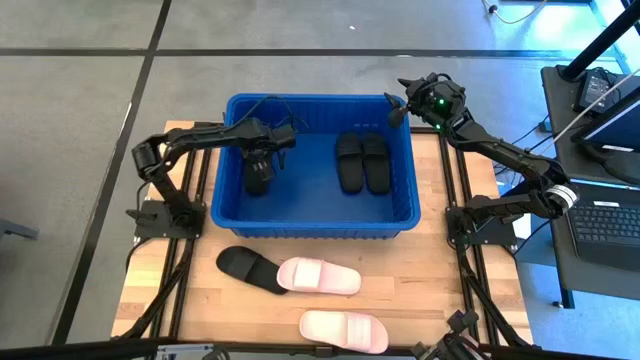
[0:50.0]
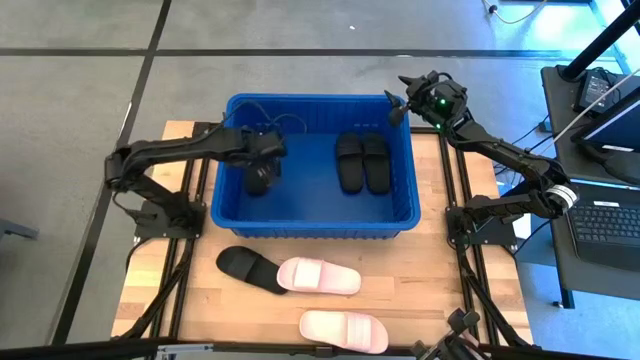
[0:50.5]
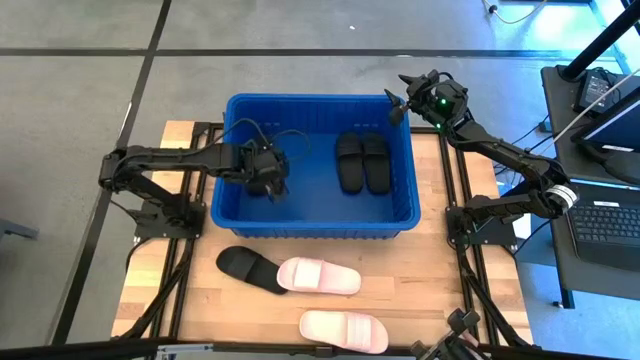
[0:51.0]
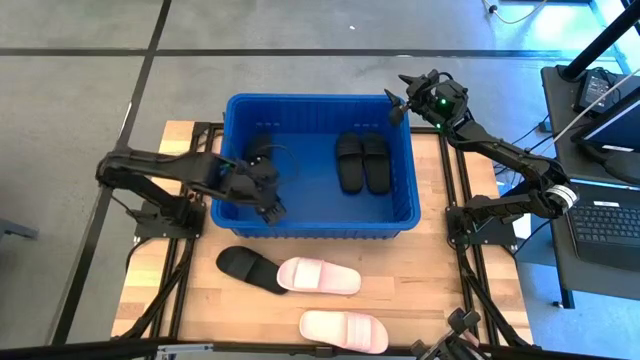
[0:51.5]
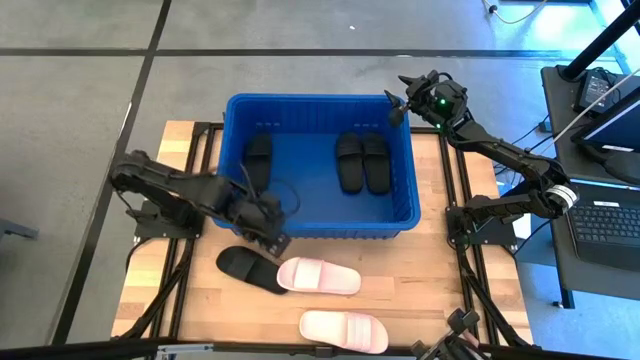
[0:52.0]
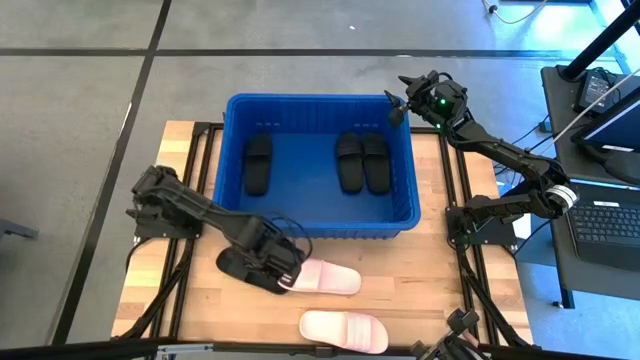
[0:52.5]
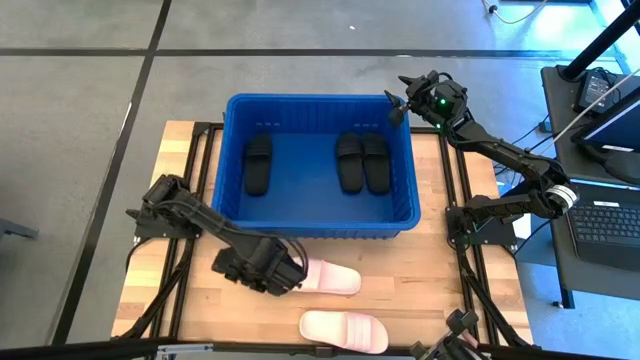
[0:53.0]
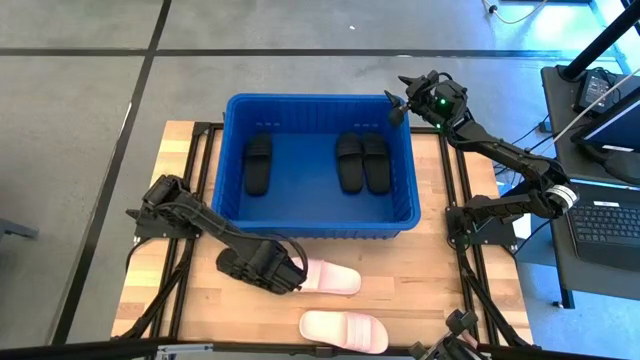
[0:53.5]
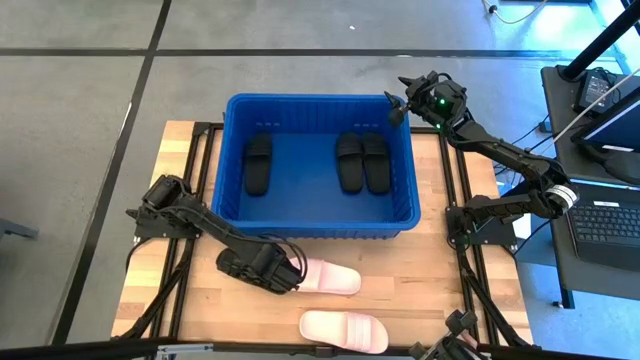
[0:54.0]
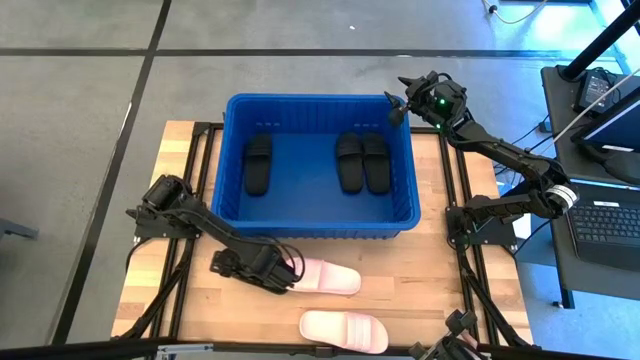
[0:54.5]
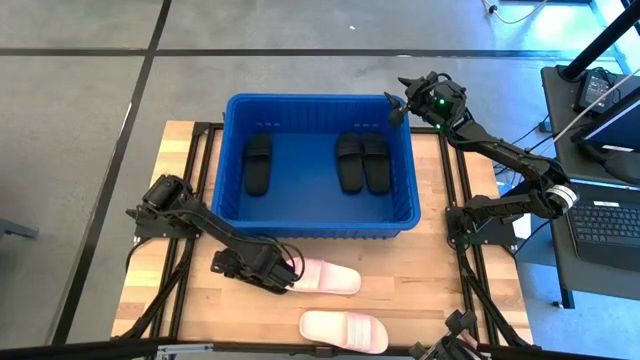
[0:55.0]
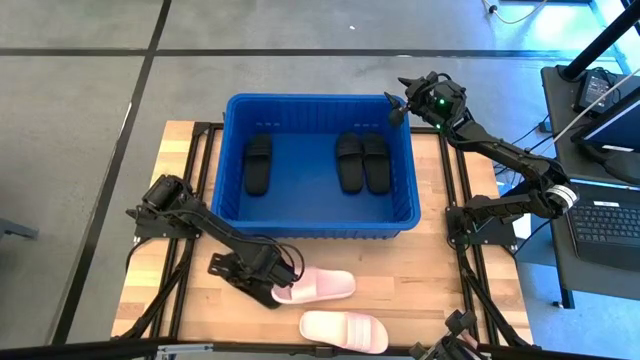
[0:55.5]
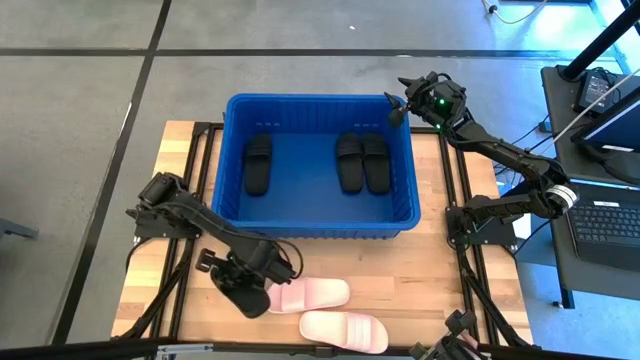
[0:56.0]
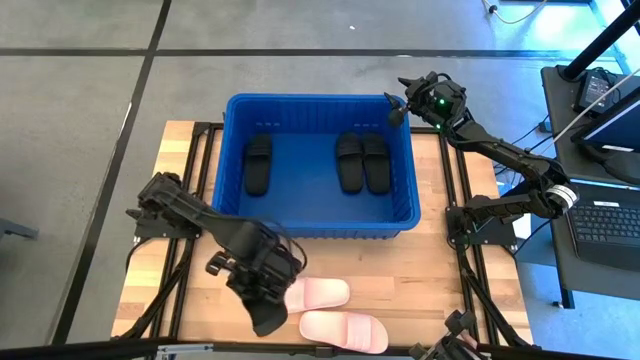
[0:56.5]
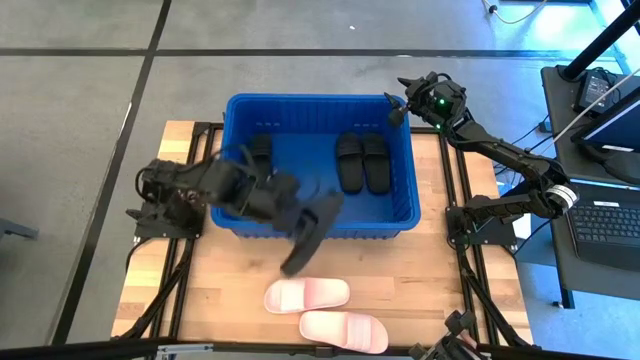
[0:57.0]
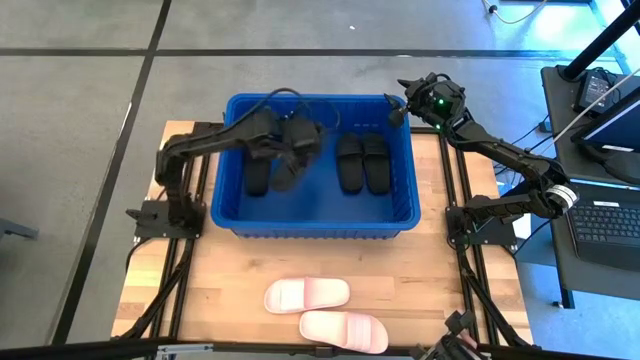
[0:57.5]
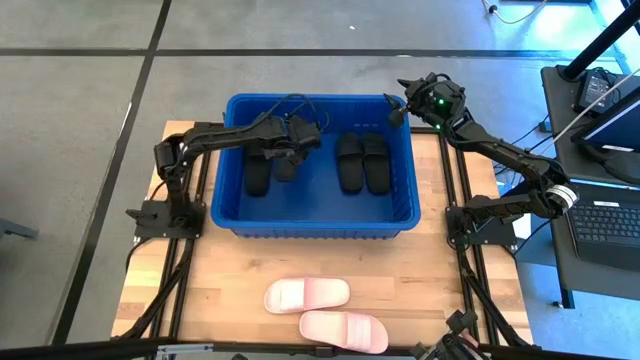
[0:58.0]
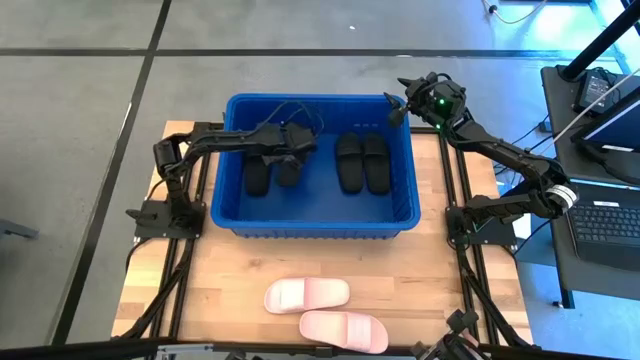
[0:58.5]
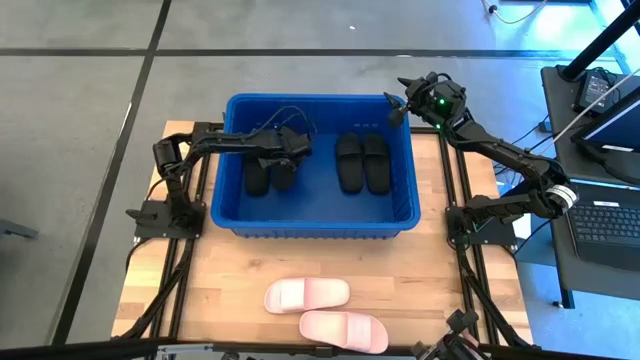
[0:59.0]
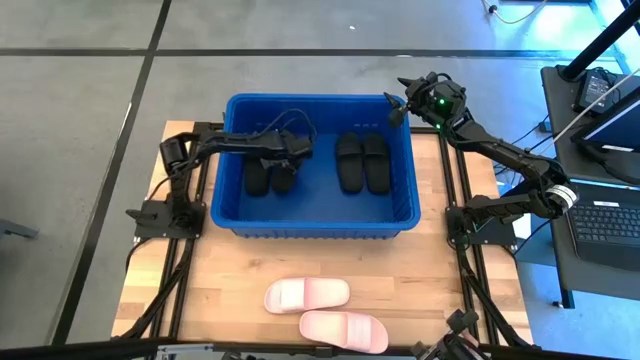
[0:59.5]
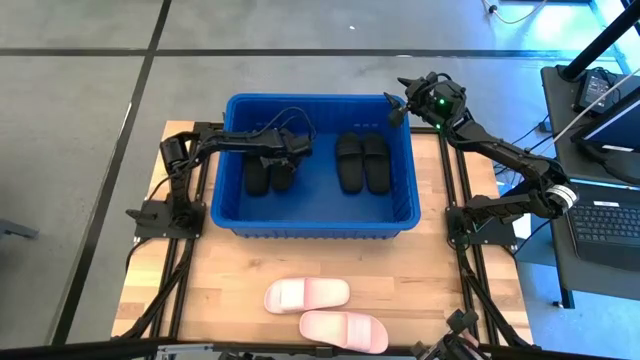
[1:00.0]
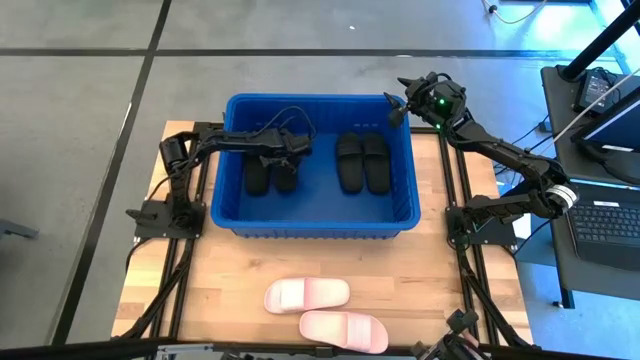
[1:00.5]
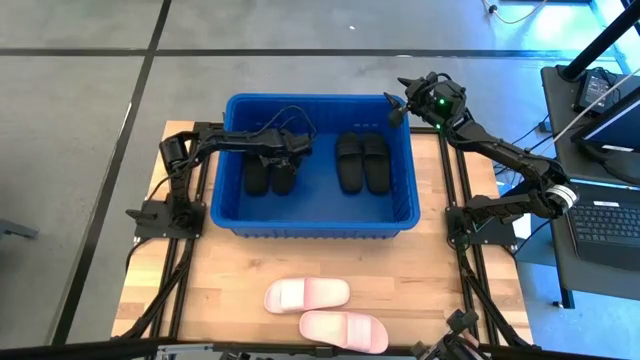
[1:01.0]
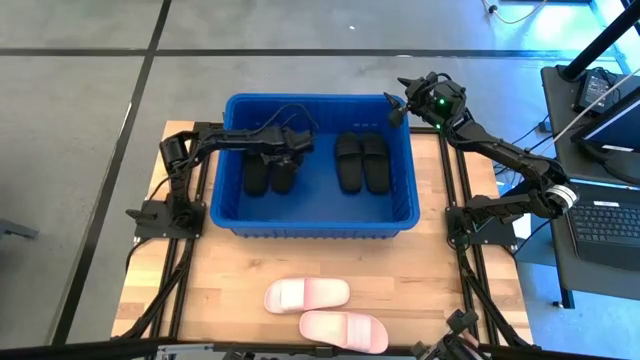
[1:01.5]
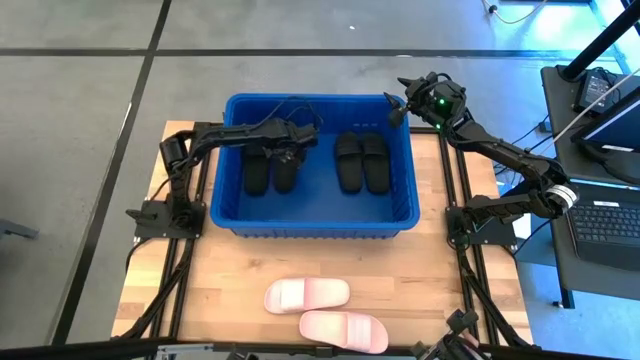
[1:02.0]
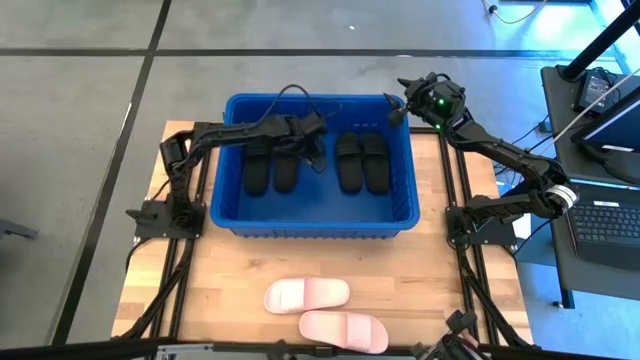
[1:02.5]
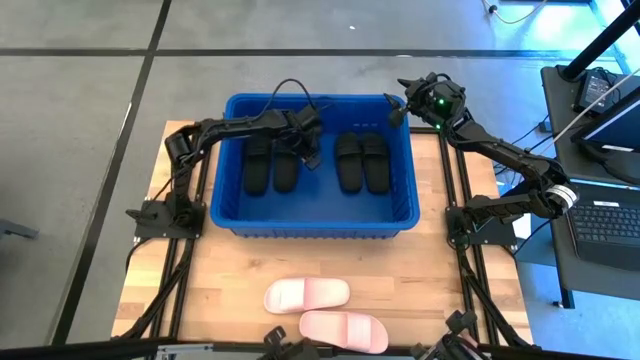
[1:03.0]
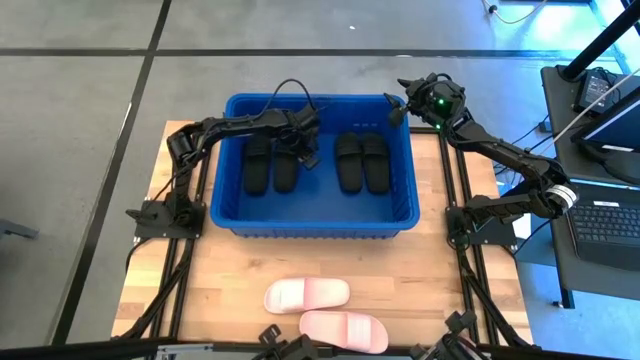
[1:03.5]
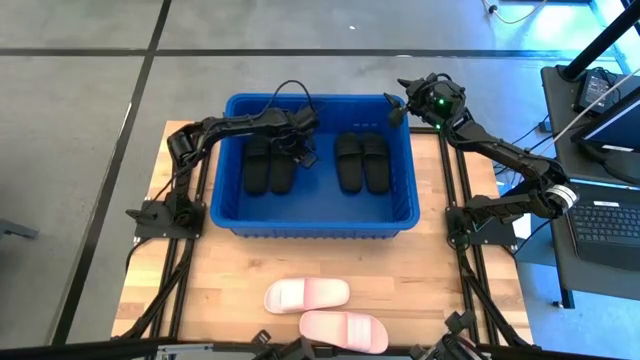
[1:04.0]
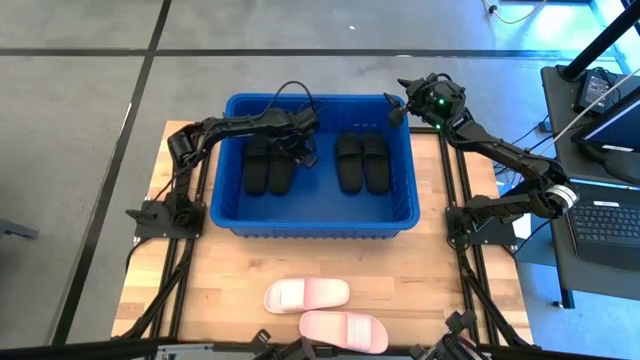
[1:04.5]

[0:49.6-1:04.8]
Task: Pick and place slides into bin
Put the black slide into the blue container

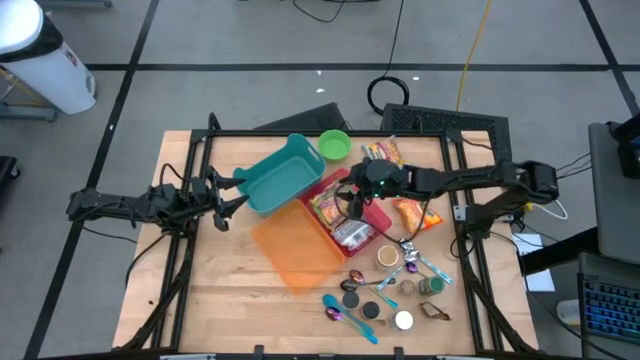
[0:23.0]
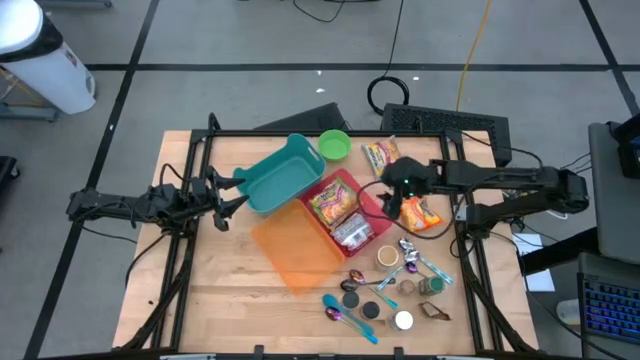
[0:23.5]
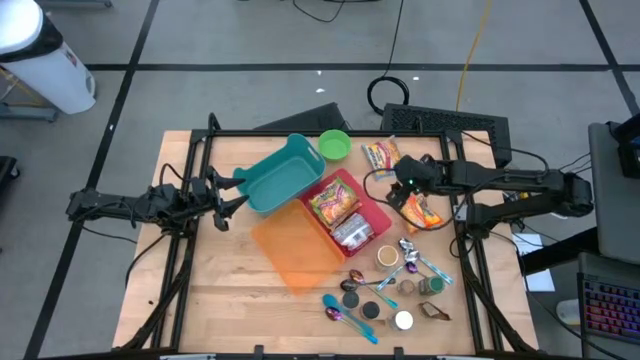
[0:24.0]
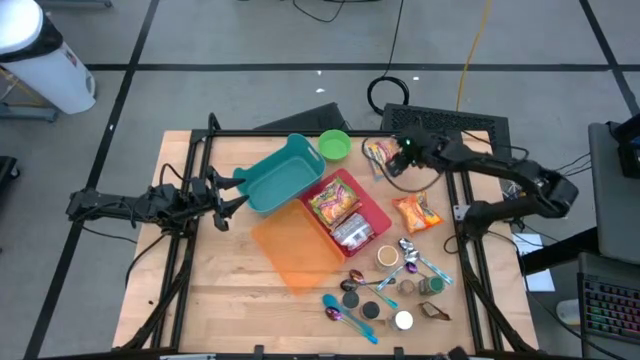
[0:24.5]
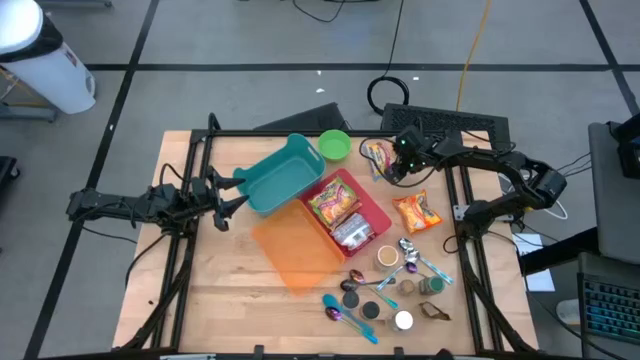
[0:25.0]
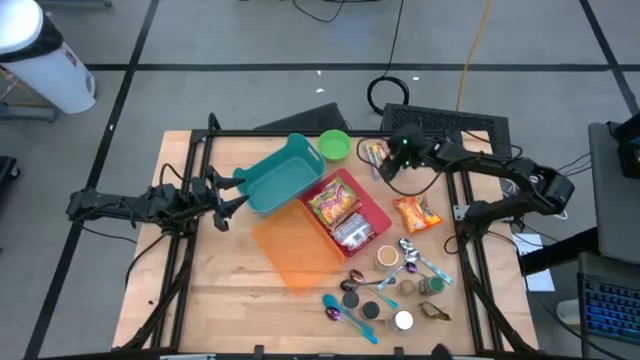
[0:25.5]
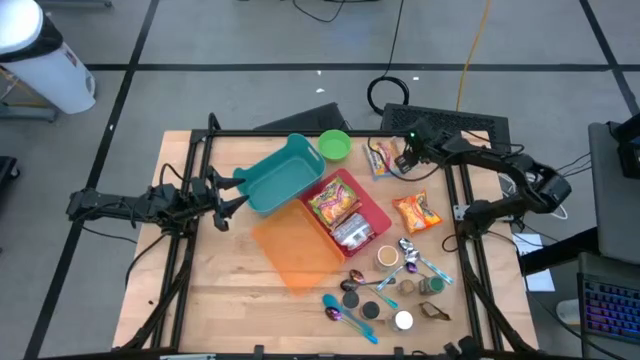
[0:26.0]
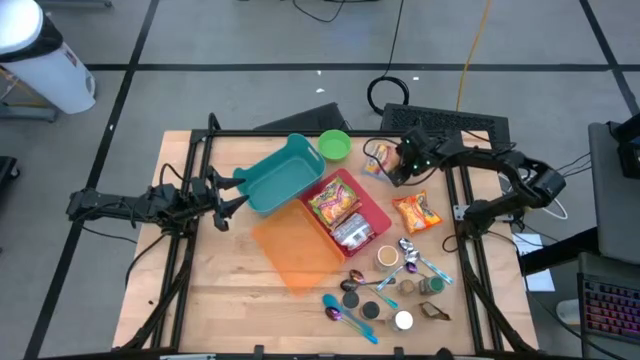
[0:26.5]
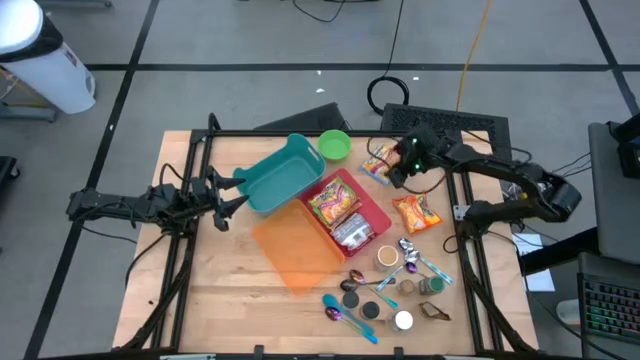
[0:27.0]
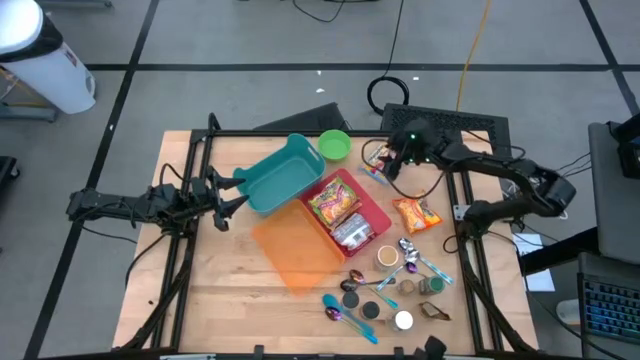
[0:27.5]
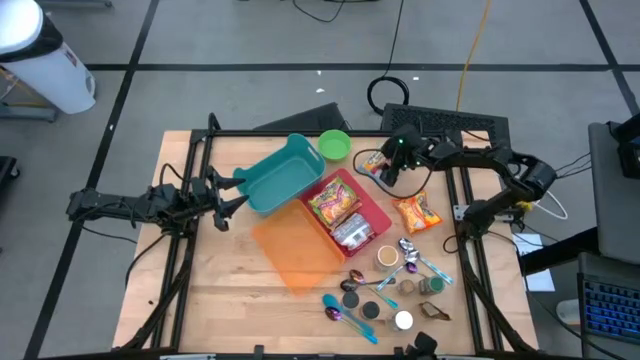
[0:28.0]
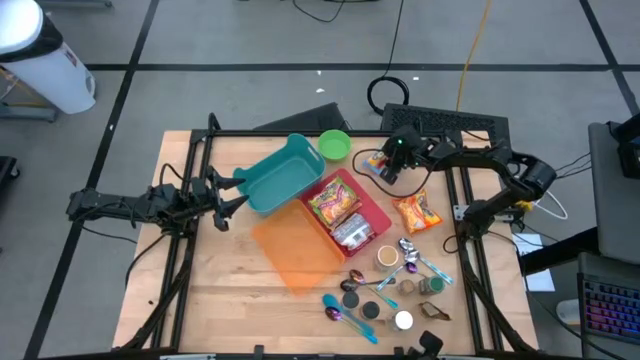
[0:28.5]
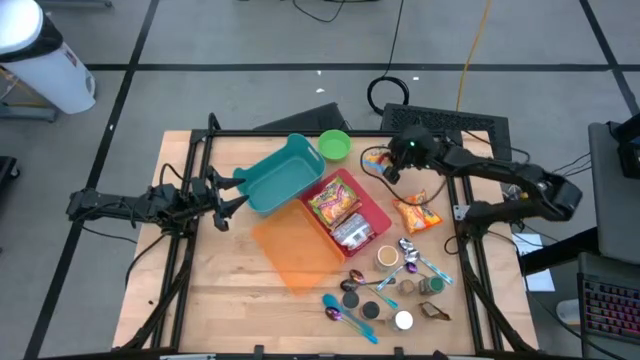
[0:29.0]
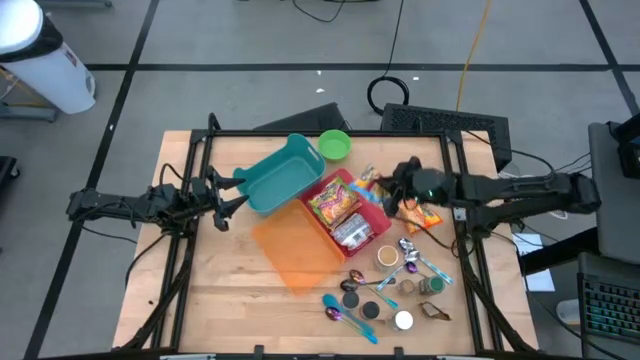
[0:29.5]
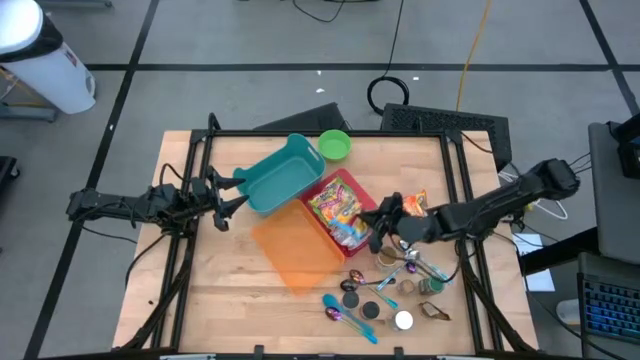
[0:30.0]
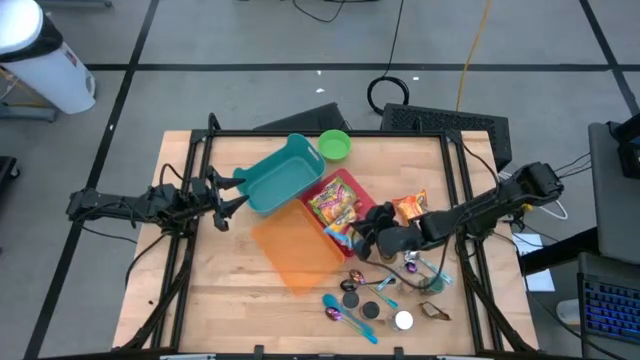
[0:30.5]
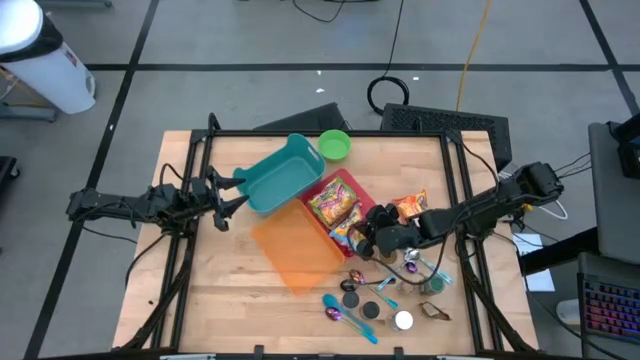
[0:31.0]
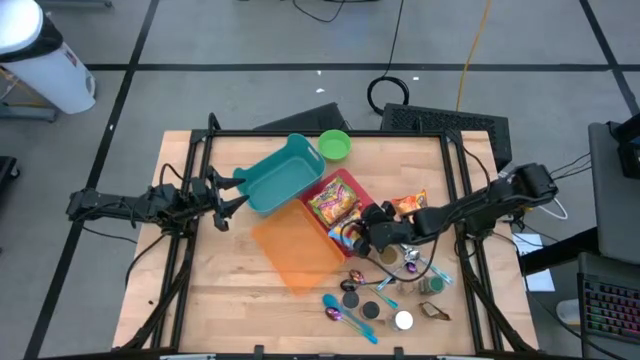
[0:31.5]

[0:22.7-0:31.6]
Task: Pick & Place Food Item
Put the blue noodle pack into the red bin
